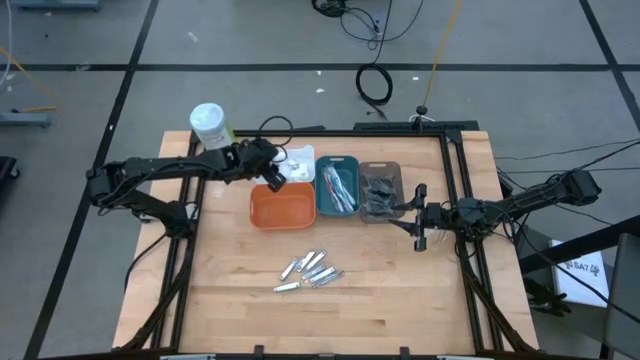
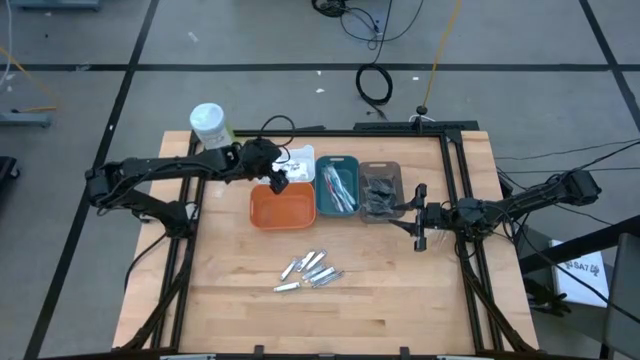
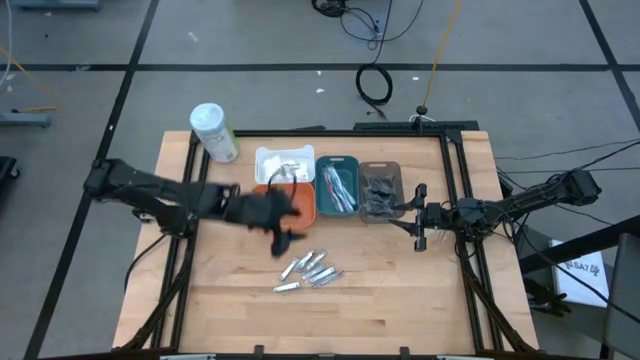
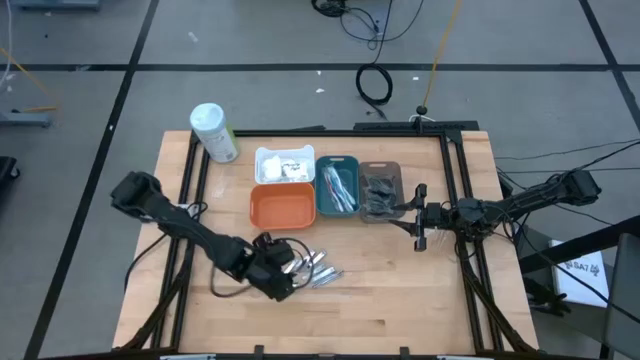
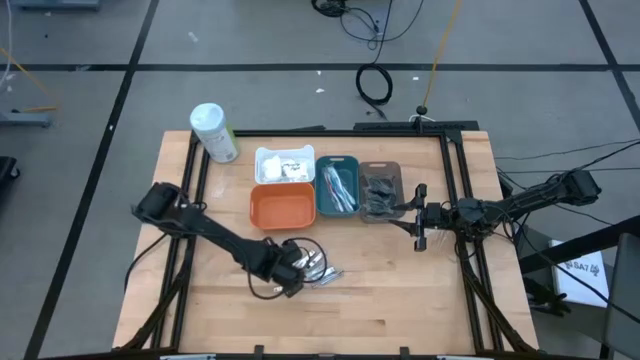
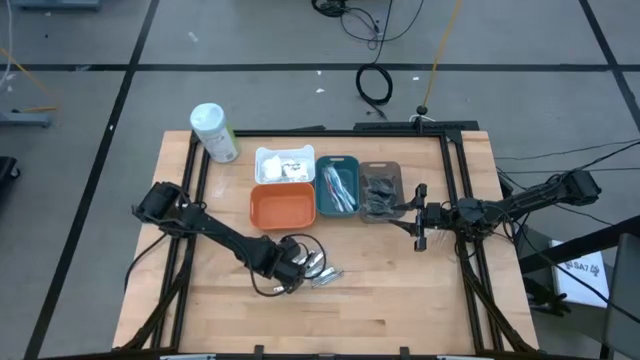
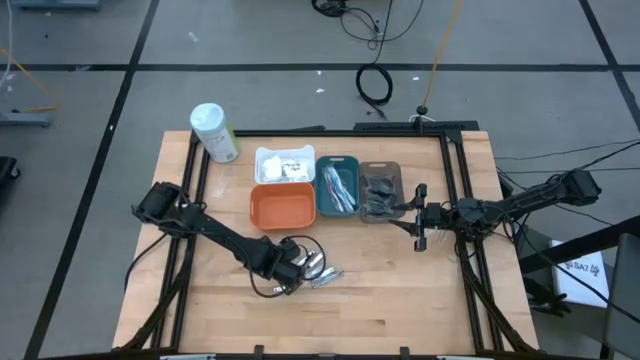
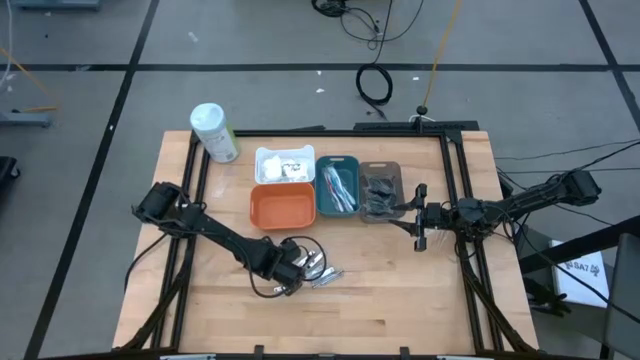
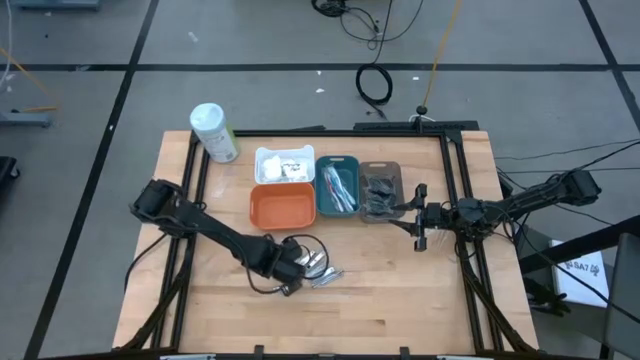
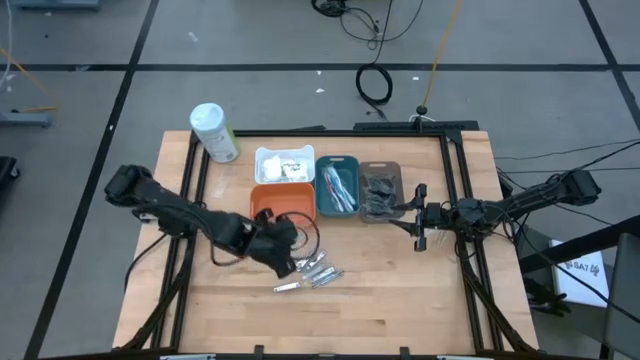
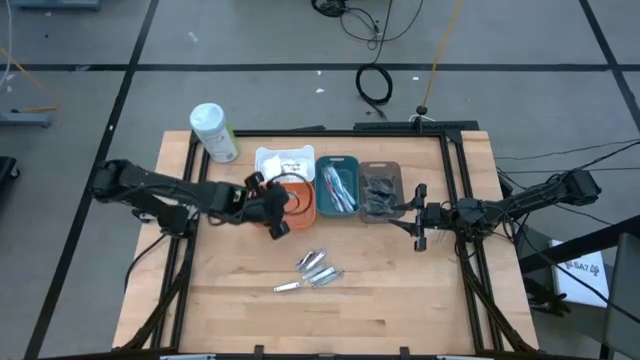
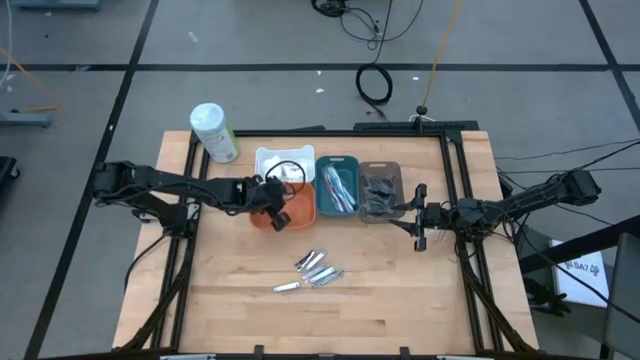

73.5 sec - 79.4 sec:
Task: Pick & Place Travel size toiletries
Put the nail cutter into the orange bin

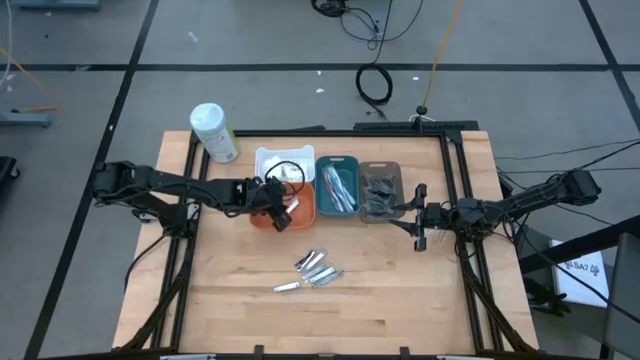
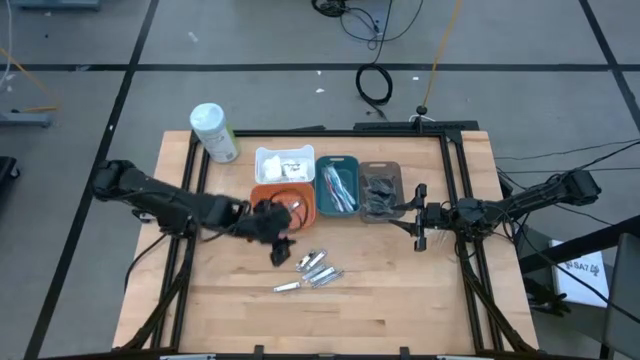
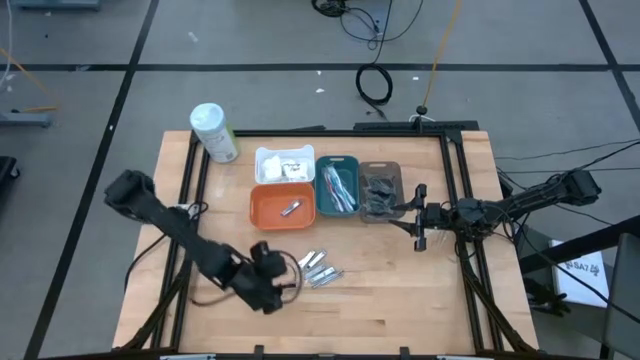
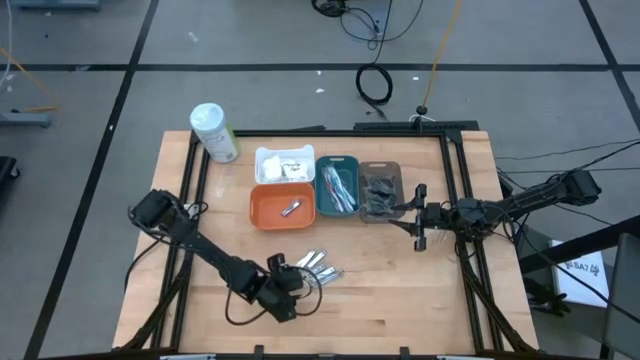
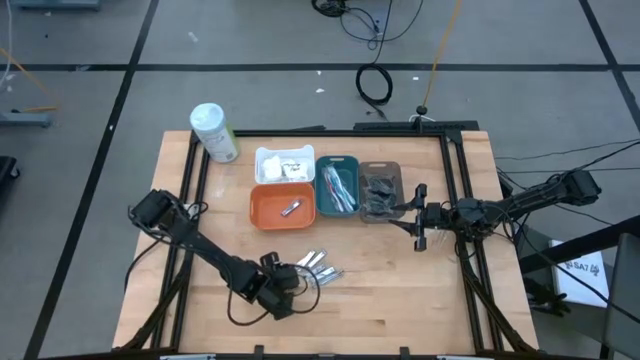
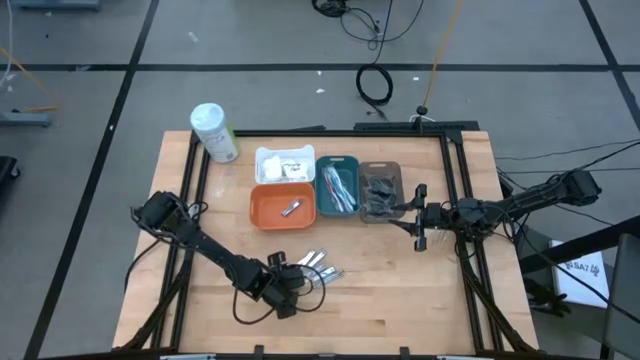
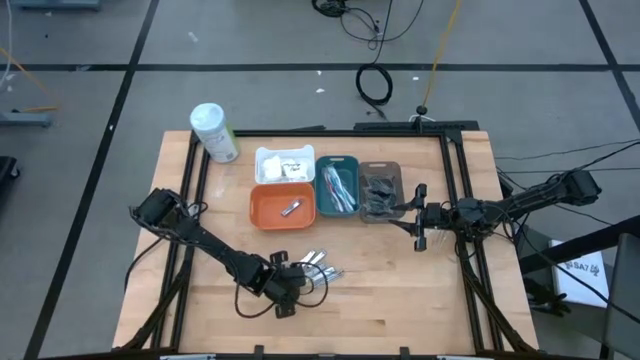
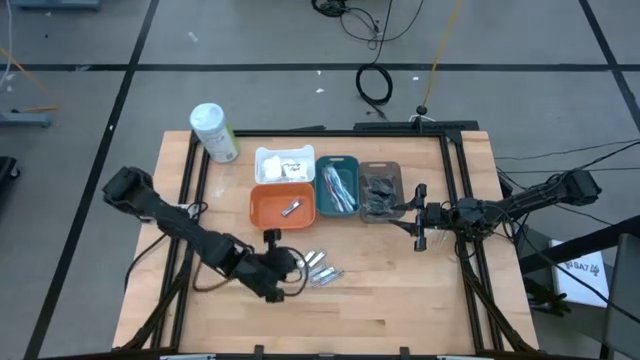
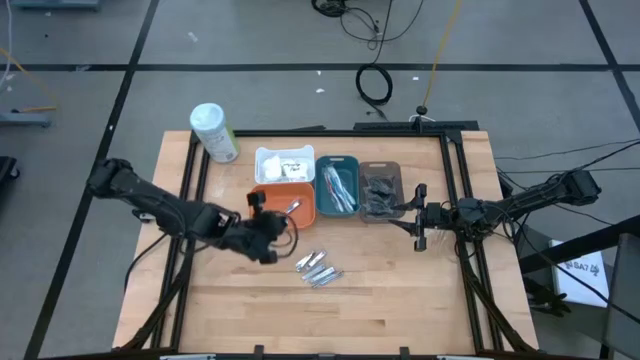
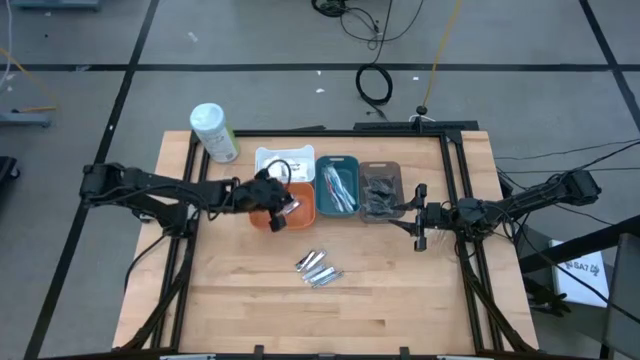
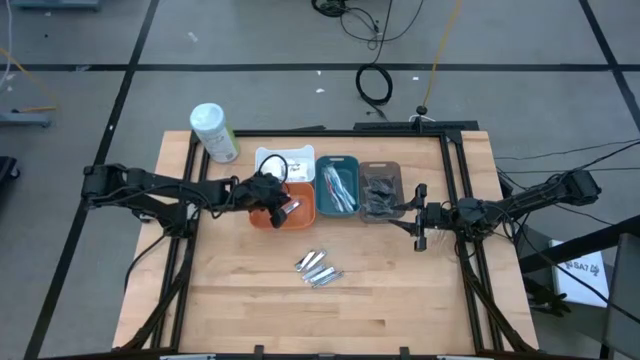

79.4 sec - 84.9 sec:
Put the nail cutter into the orange bin

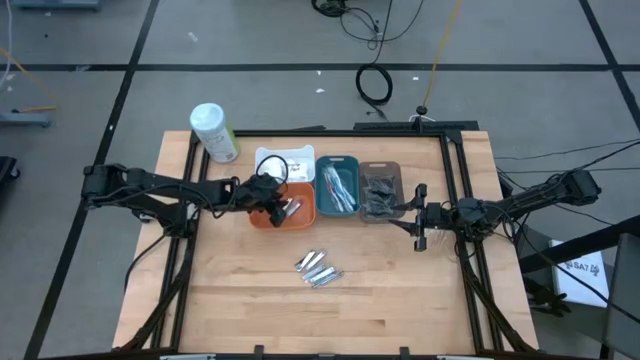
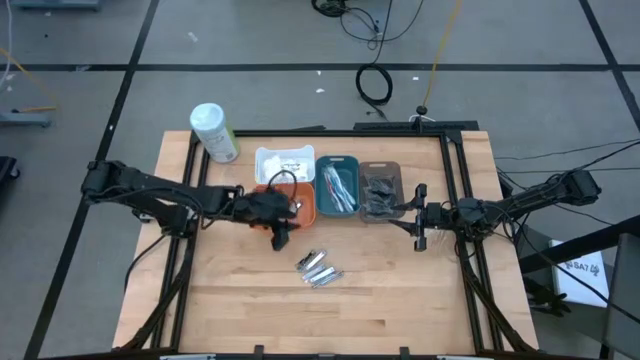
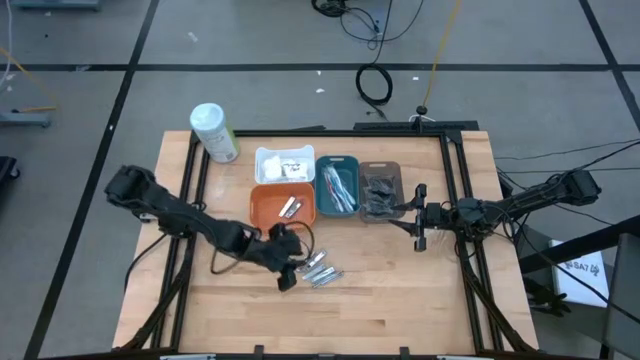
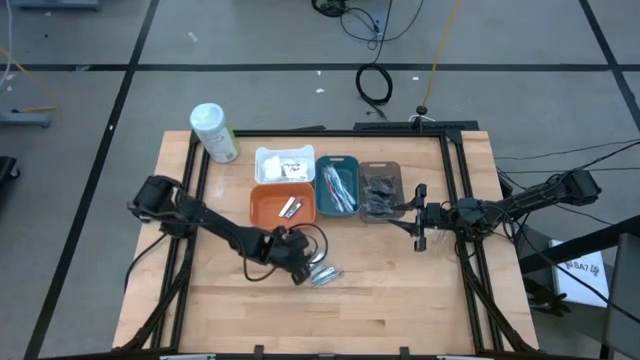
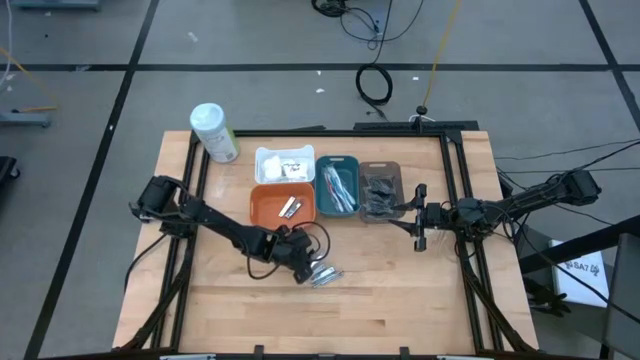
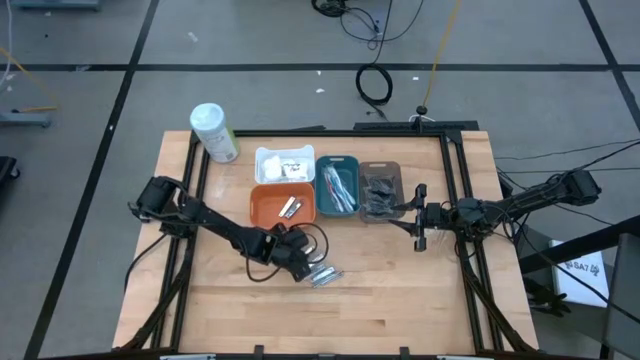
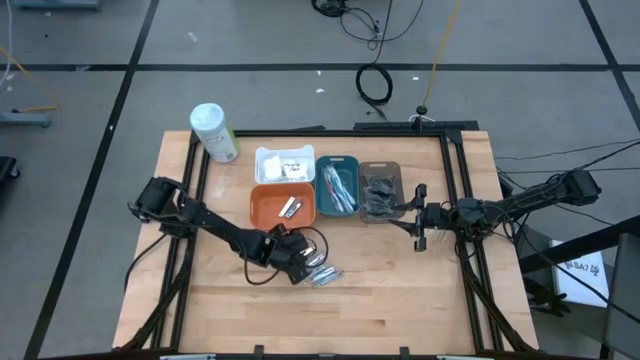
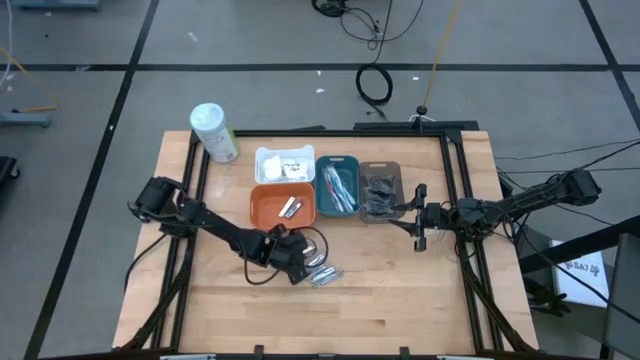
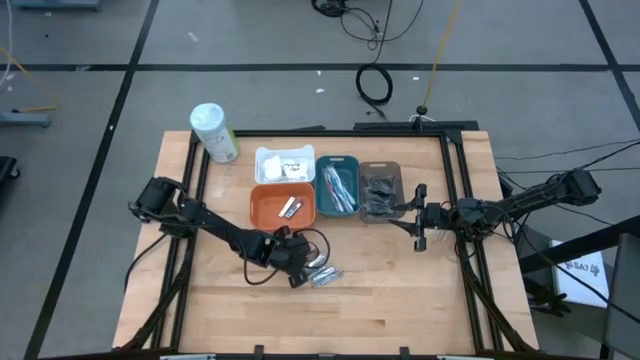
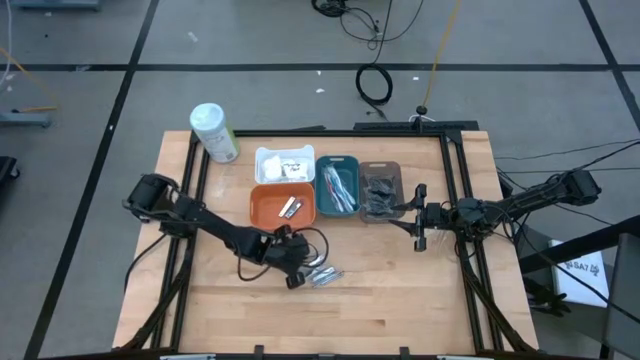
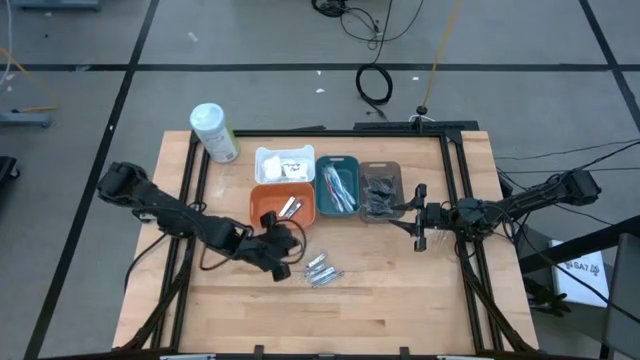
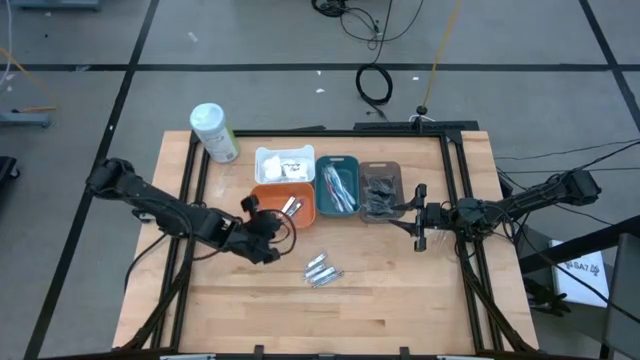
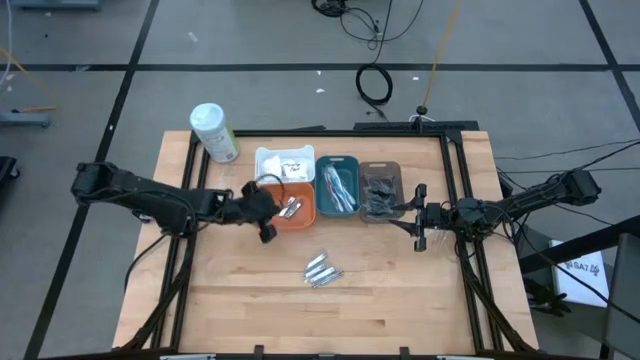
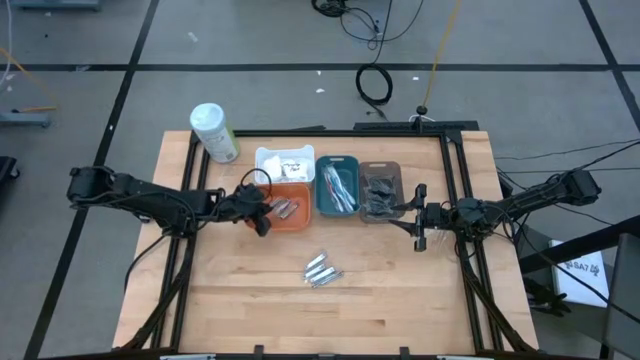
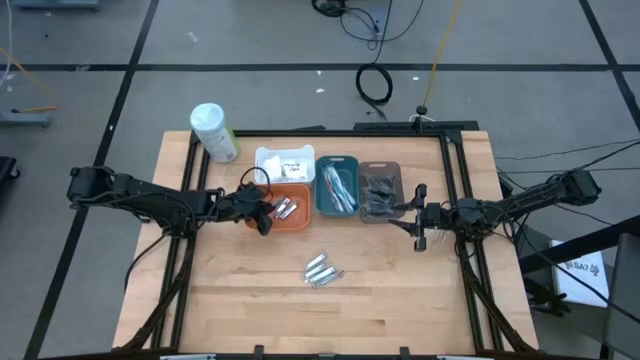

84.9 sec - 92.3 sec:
Put the nail cutter into the orange bin

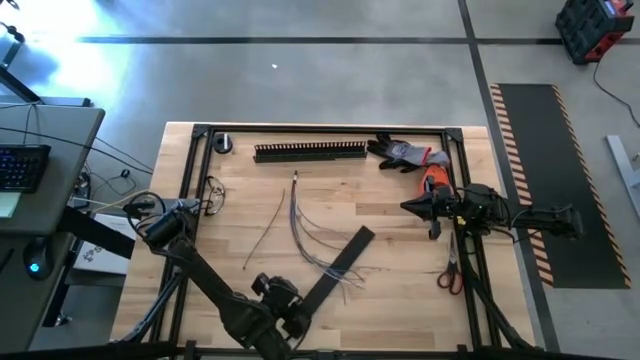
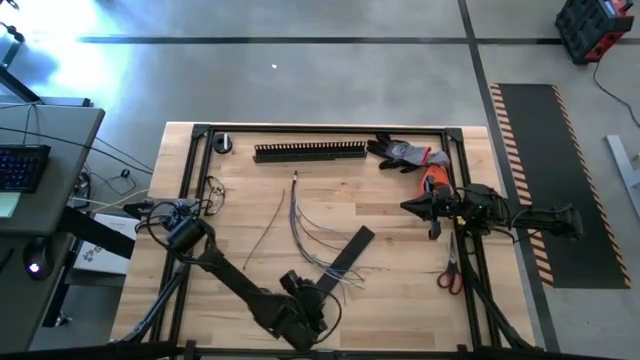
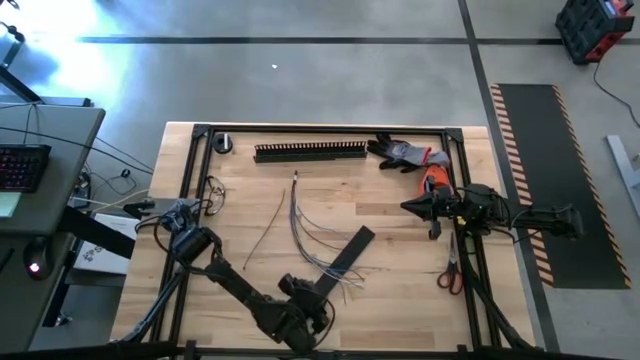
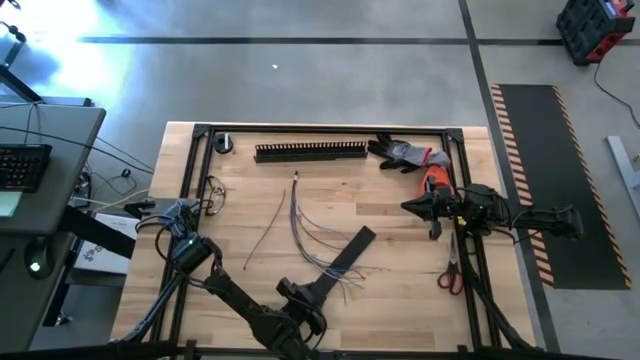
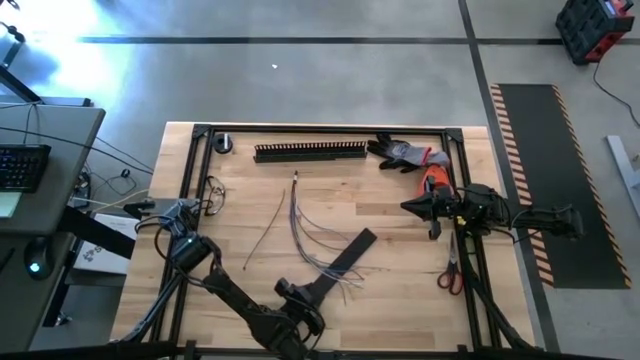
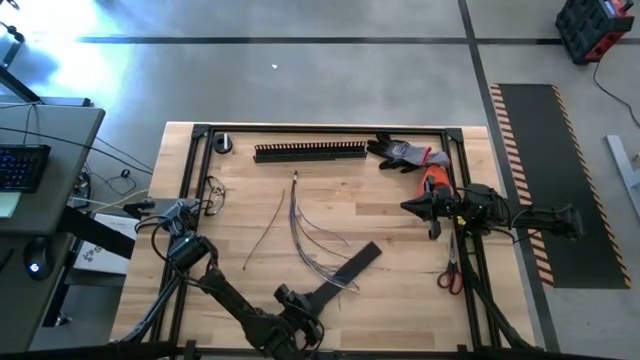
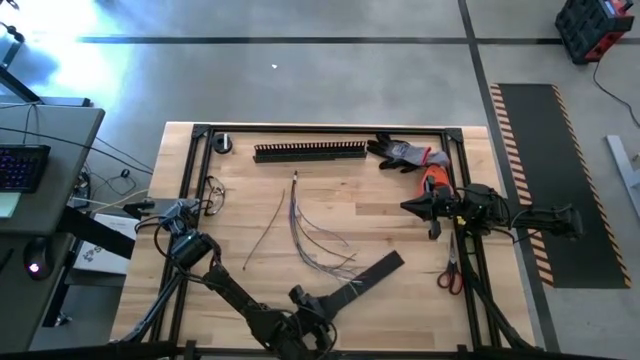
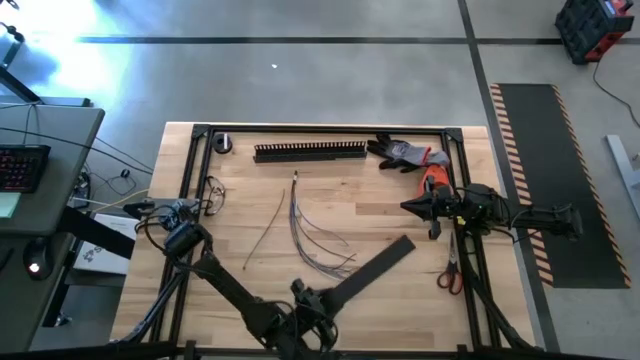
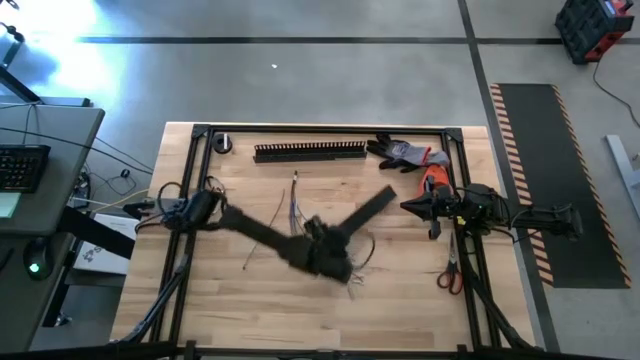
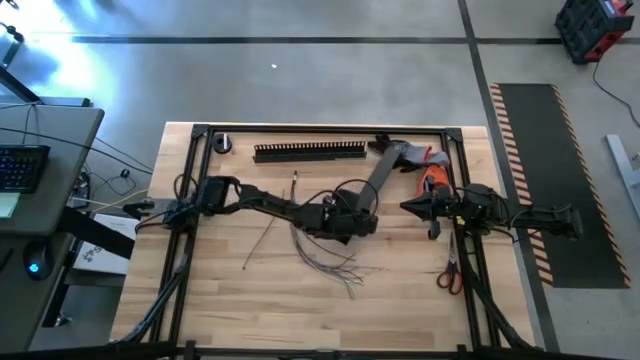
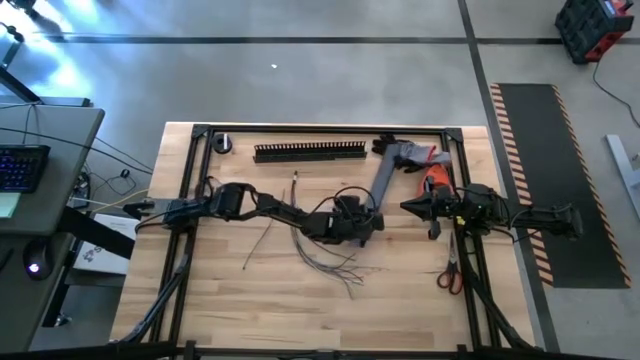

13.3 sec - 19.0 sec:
Task: Ziptie cables
Move the black cable duct lid to the top right of the table
